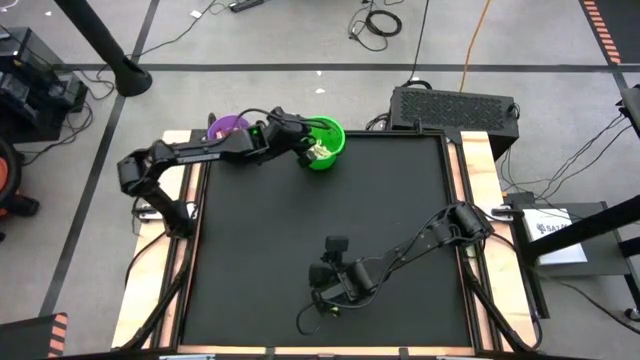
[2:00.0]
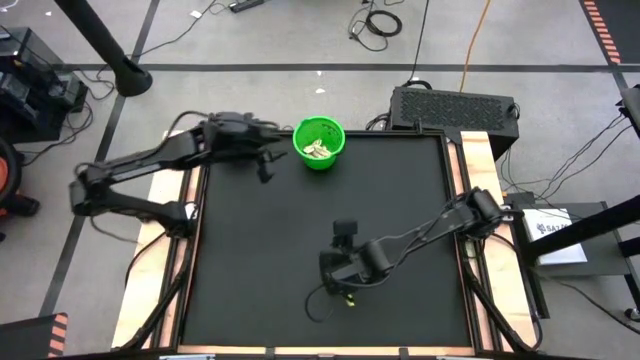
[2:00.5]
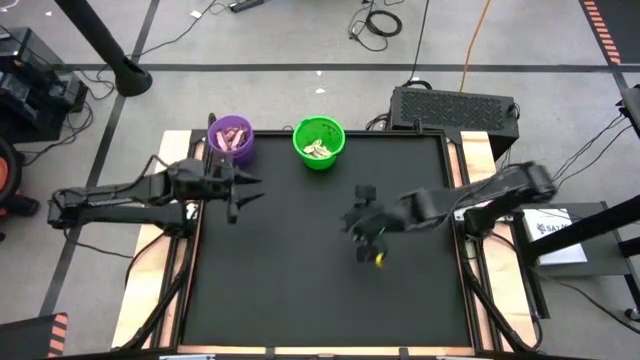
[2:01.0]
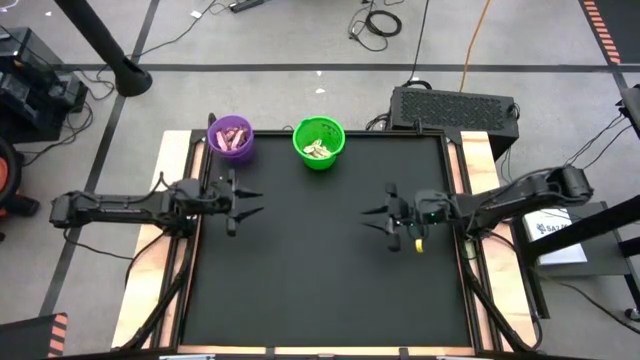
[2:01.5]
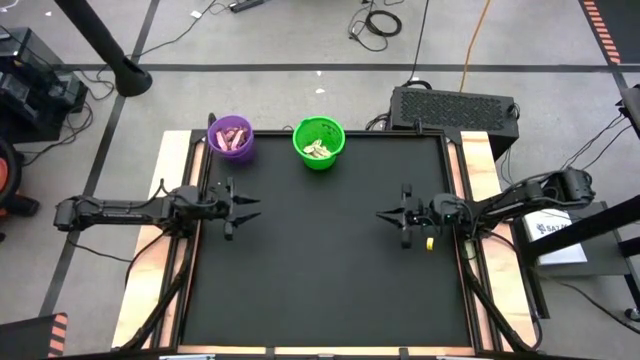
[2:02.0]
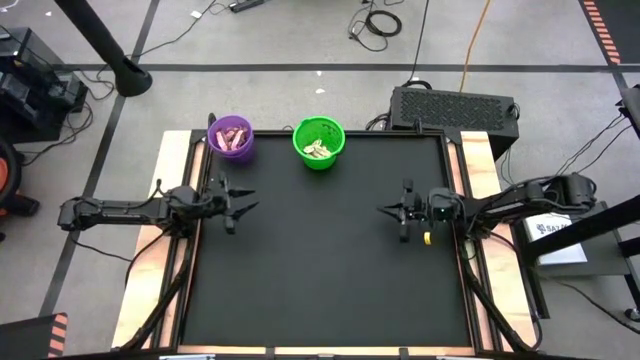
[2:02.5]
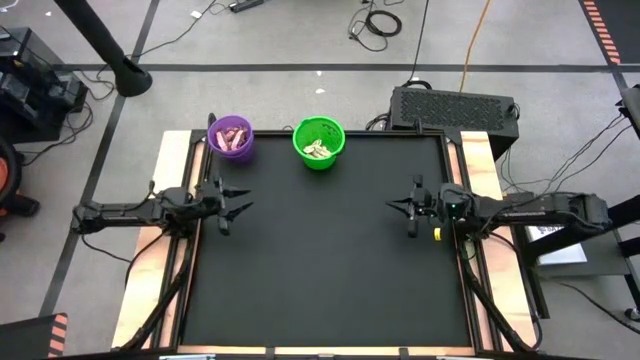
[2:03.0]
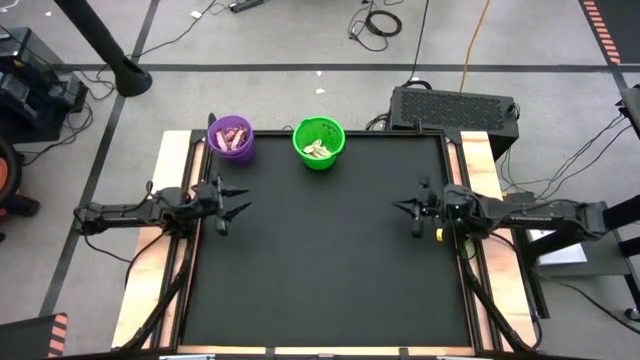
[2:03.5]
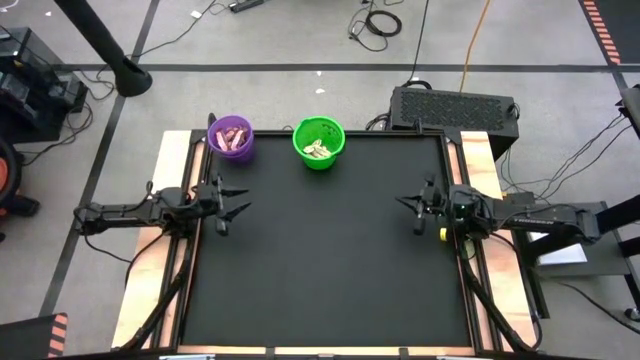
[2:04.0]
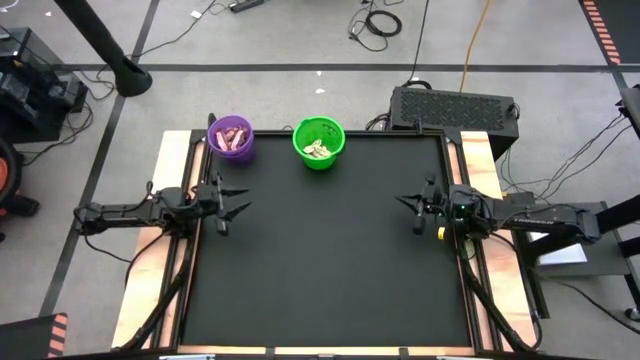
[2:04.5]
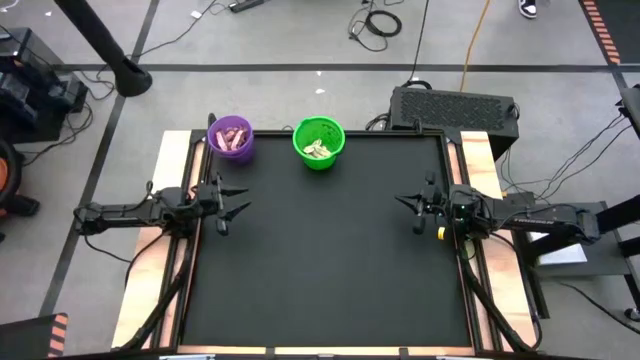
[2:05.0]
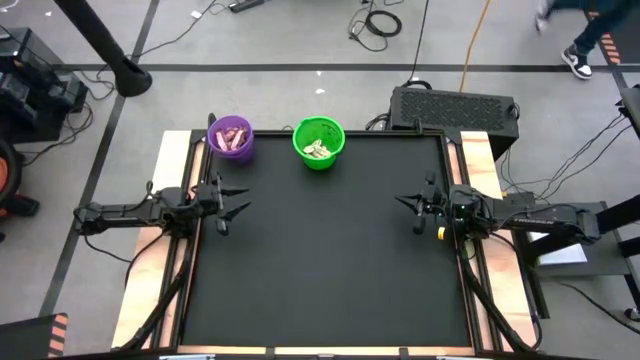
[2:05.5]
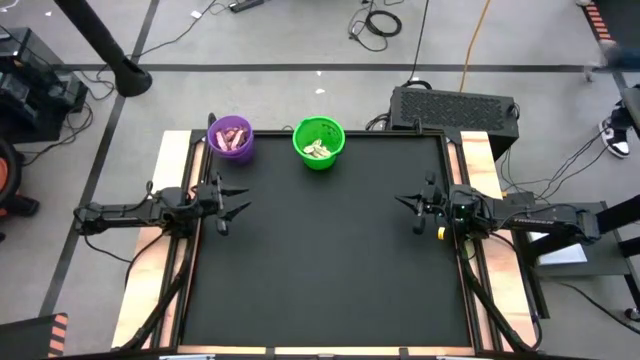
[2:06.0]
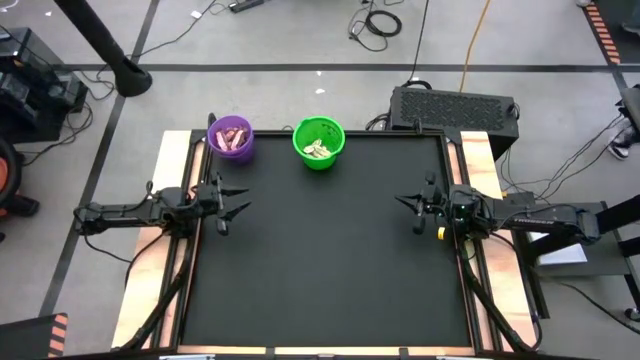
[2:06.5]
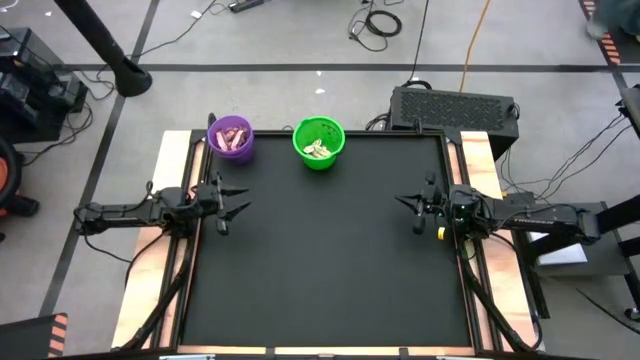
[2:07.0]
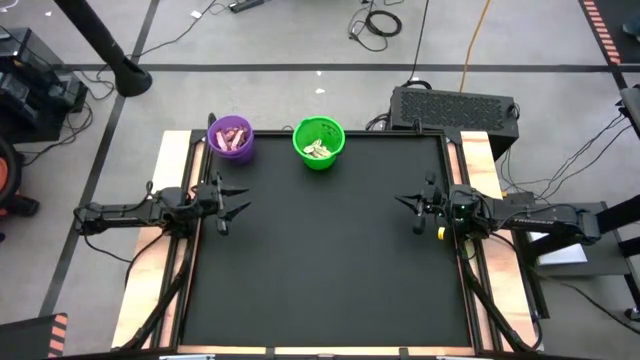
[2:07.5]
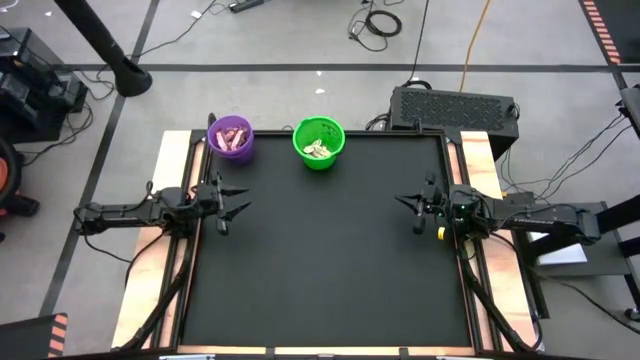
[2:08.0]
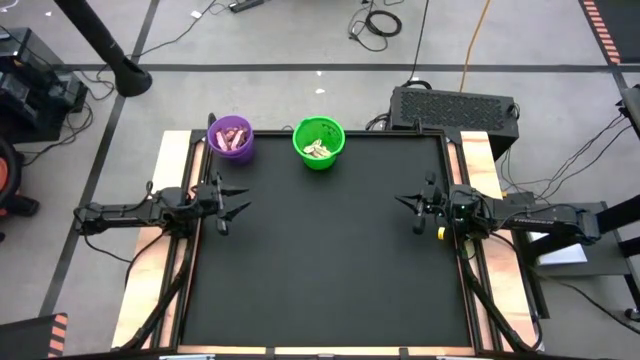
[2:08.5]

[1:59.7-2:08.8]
Task: Sort candy by brand, put in halloween buckets
Return to Home Position

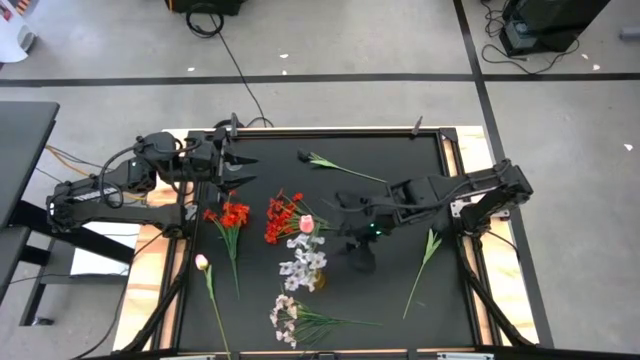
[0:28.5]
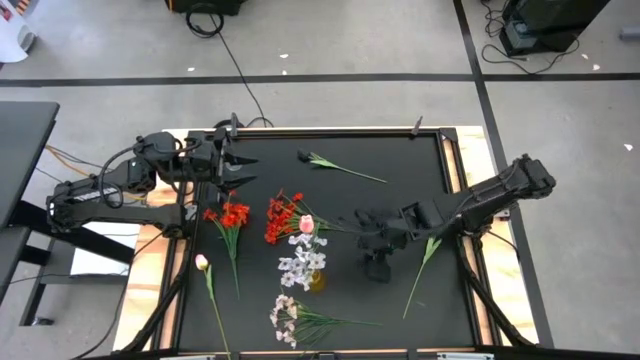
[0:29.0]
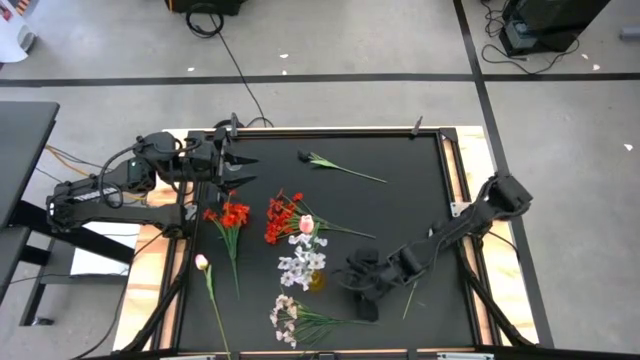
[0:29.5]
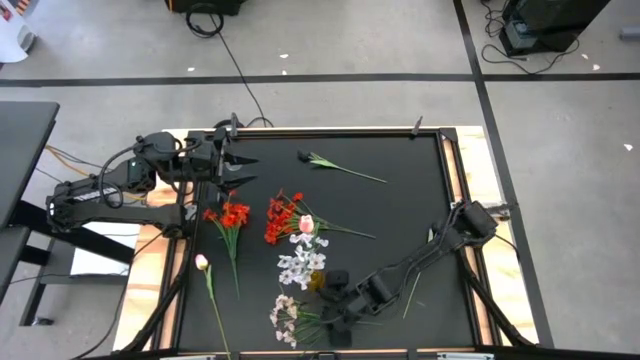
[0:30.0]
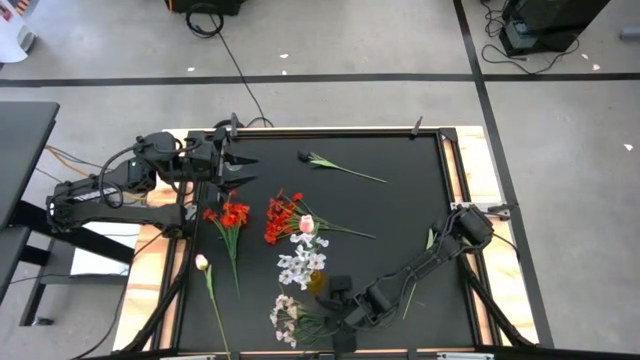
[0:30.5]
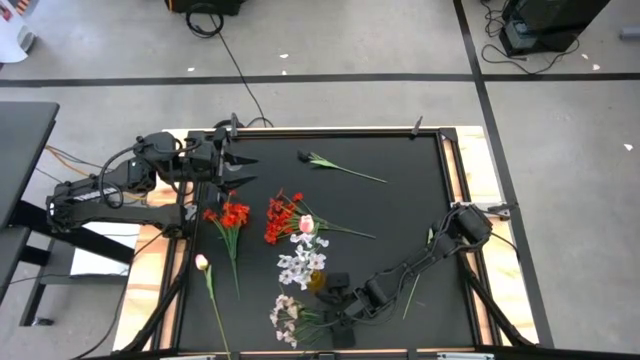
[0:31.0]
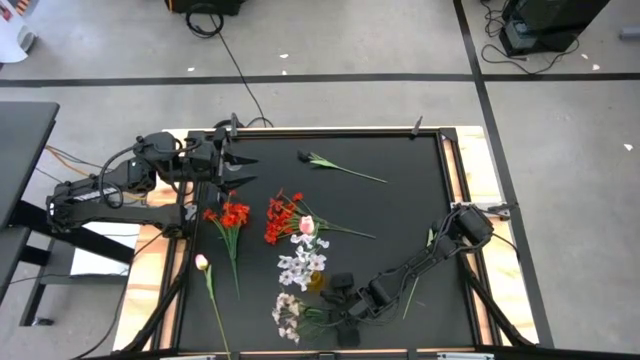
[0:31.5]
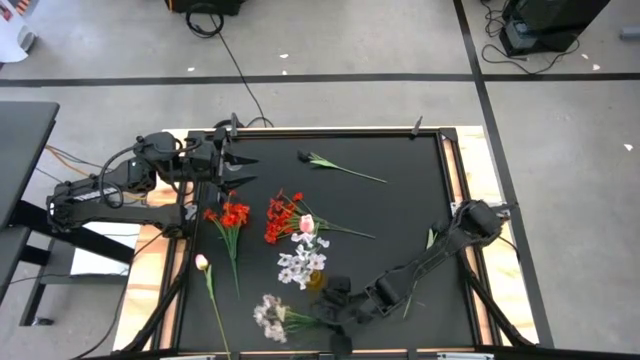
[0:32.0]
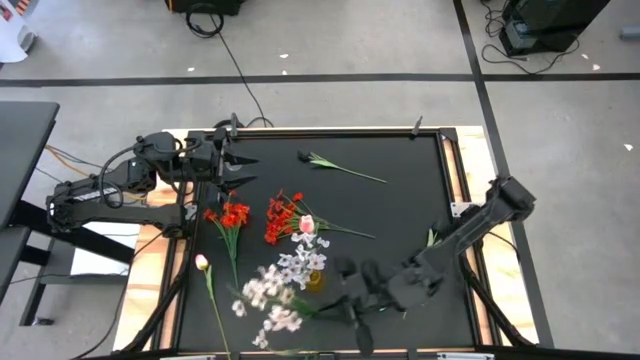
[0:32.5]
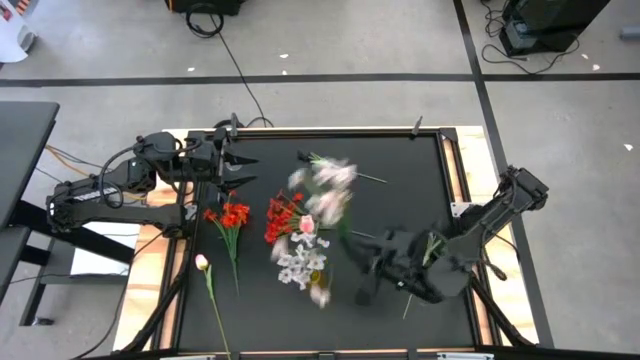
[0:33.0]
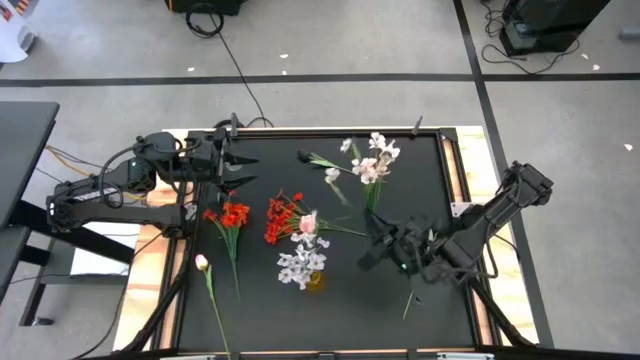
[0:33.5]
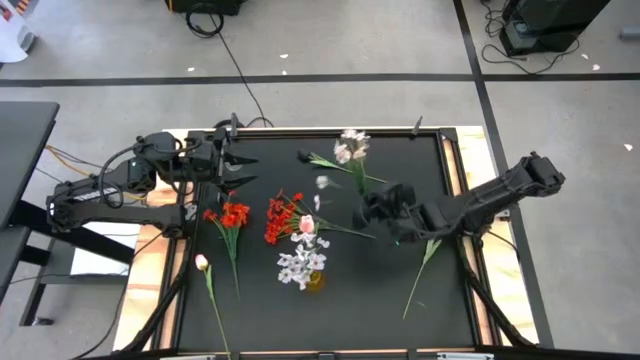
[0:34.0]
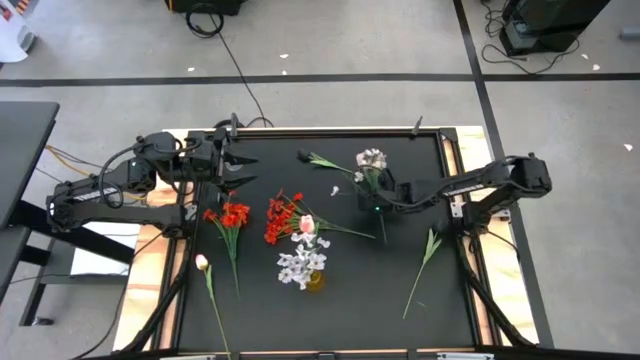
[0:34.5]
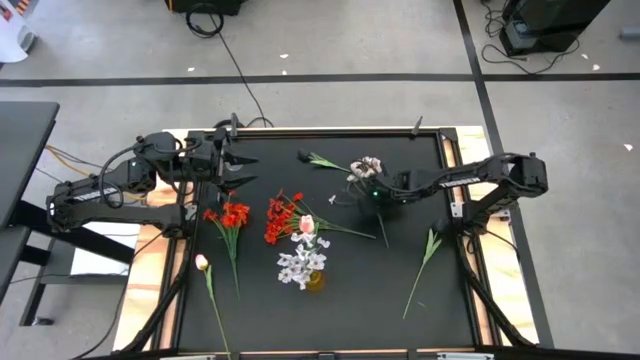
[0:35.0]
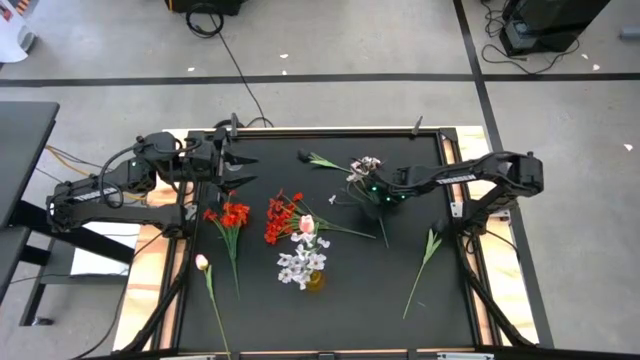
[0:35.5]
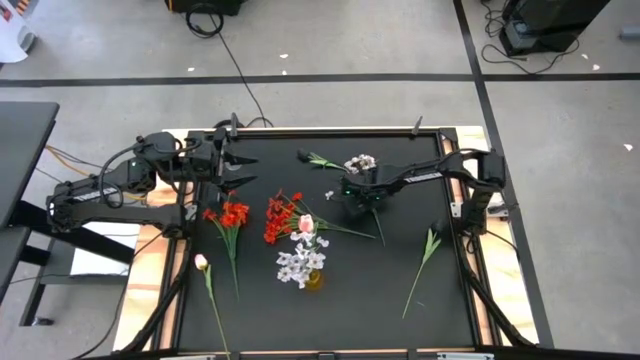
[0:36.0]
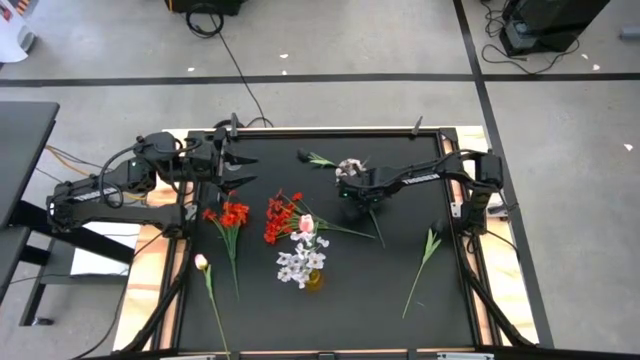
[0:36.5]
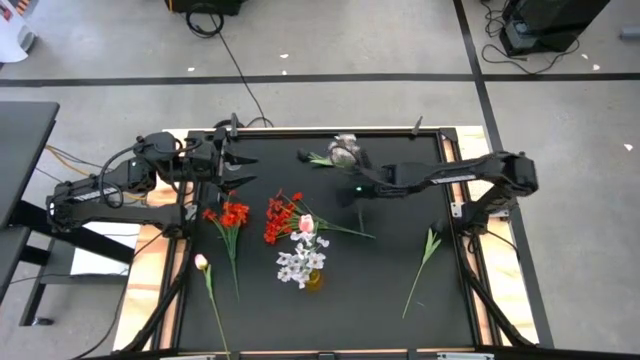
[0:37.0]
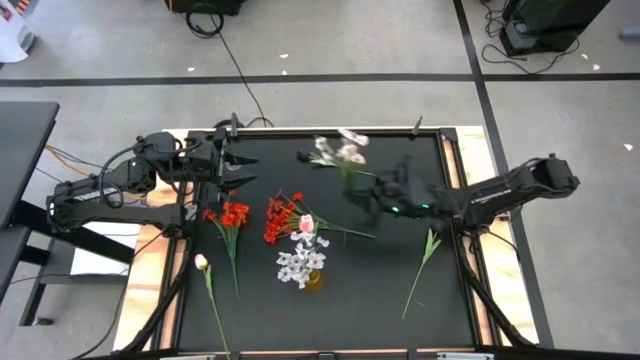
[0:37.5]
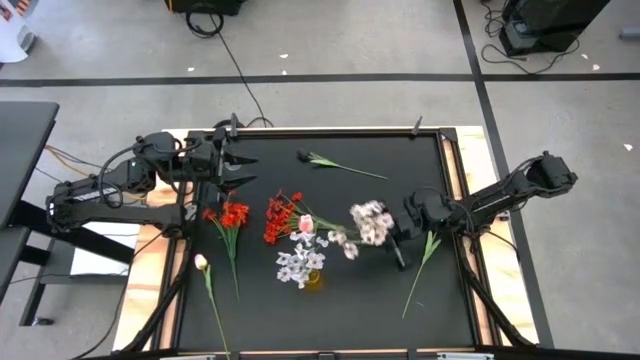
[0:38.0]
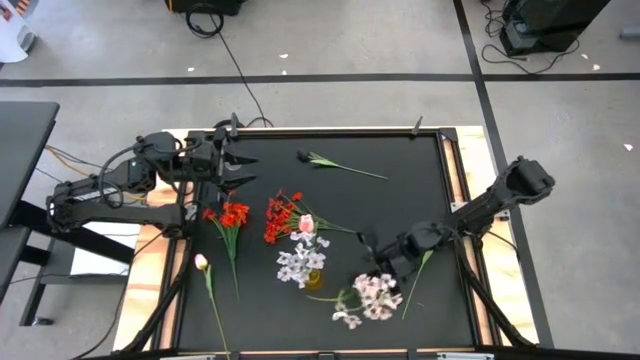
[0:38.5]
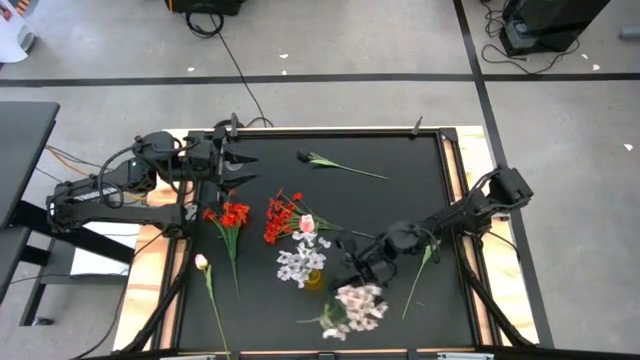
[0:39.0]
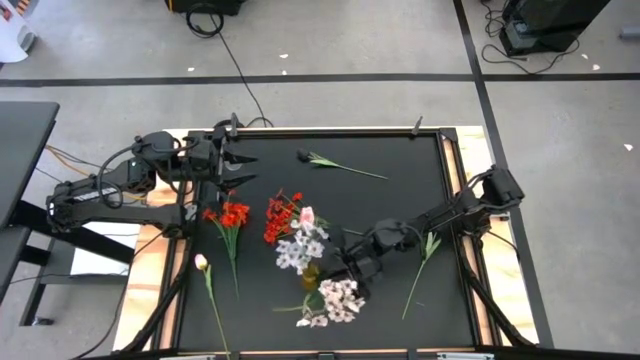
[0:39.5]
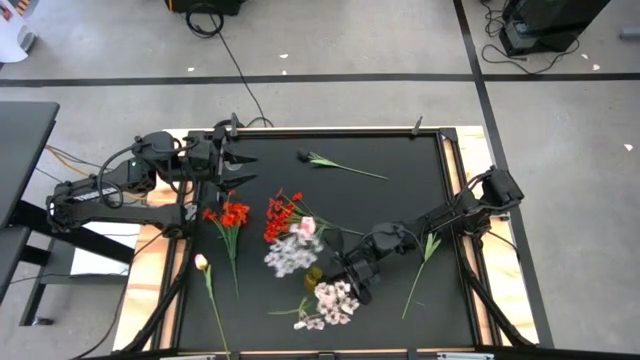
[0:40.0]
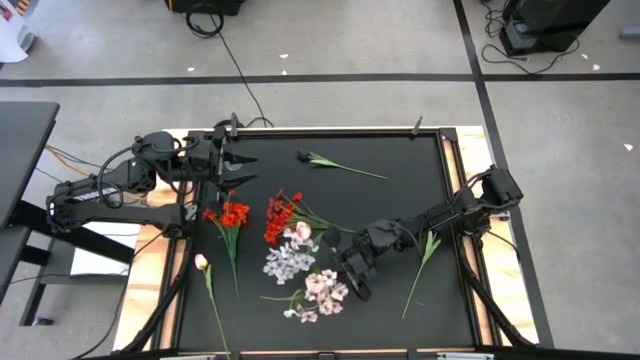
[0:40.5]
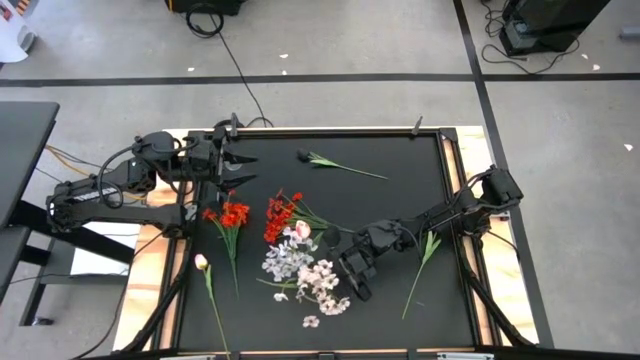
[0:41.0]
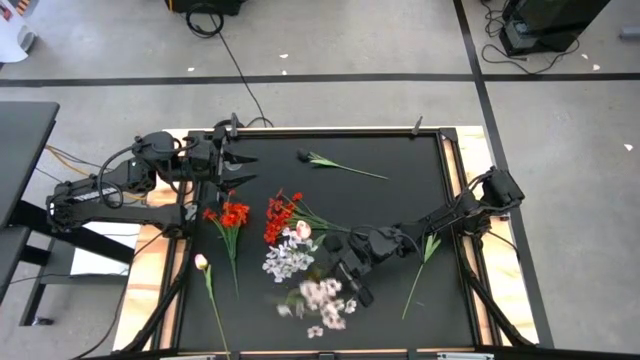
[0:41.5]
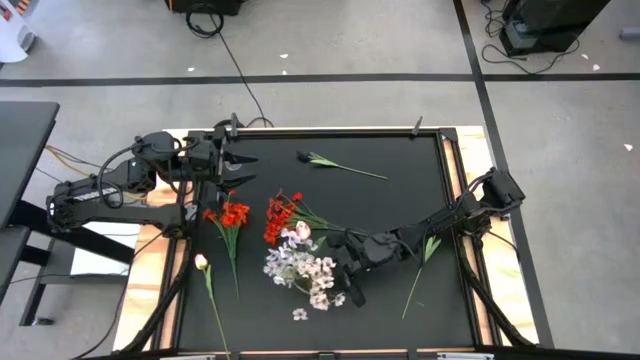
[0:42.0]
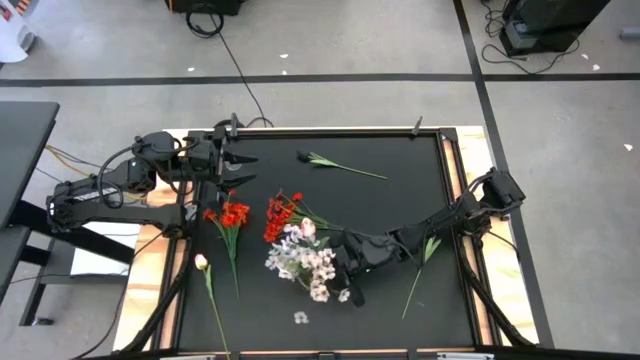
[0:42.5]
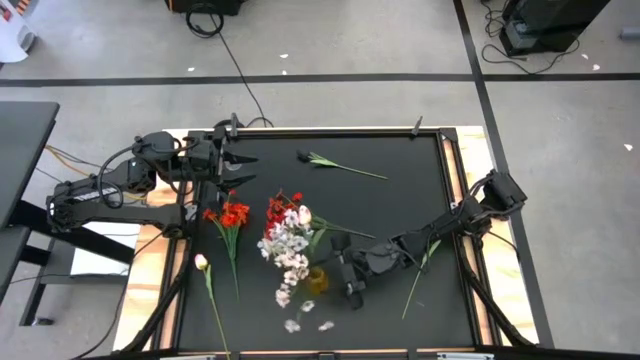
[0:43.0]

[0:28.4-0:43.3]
Task: Sort flowers into vase by color
Put the white flower into the yellow vase
